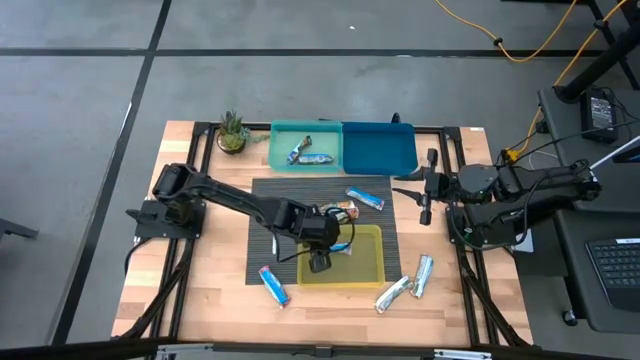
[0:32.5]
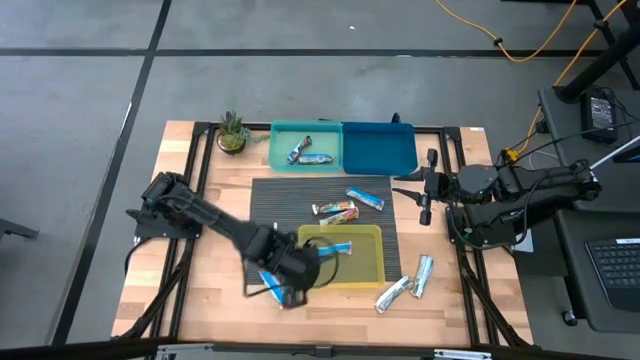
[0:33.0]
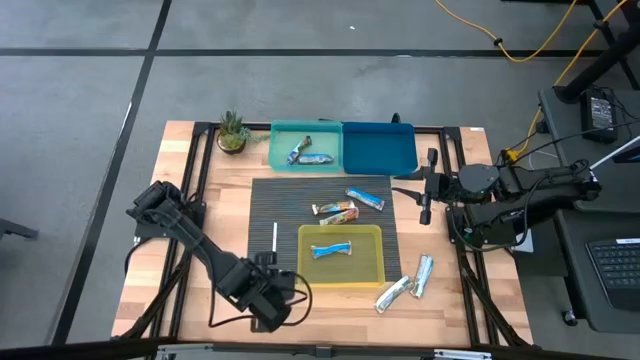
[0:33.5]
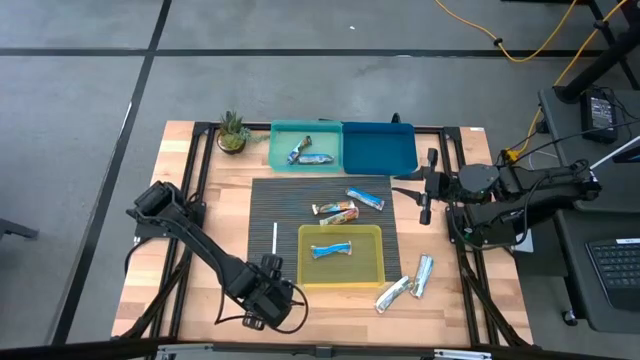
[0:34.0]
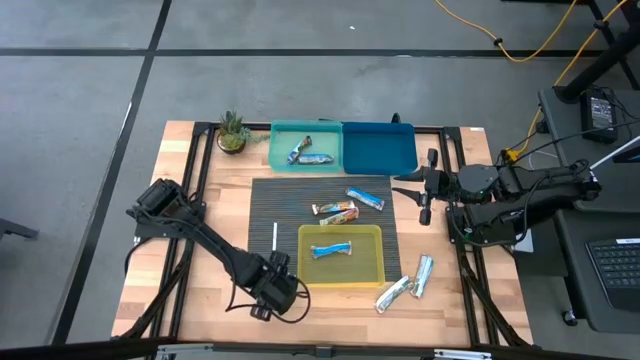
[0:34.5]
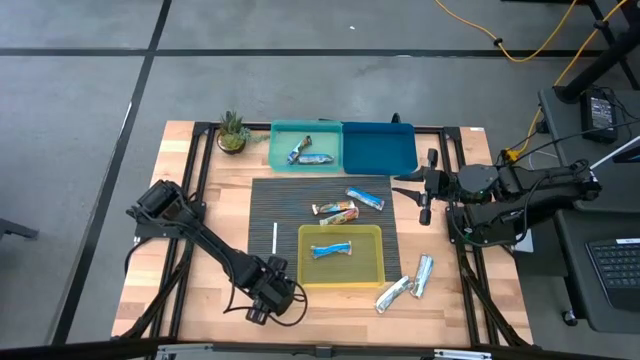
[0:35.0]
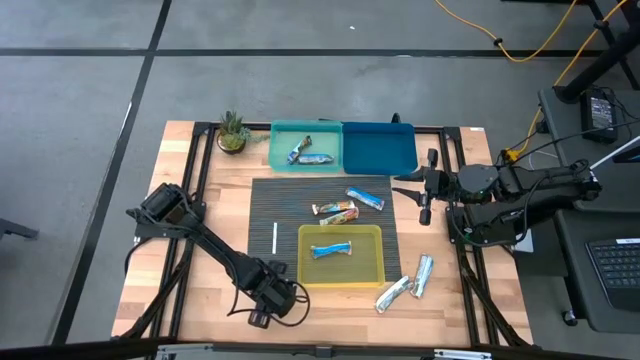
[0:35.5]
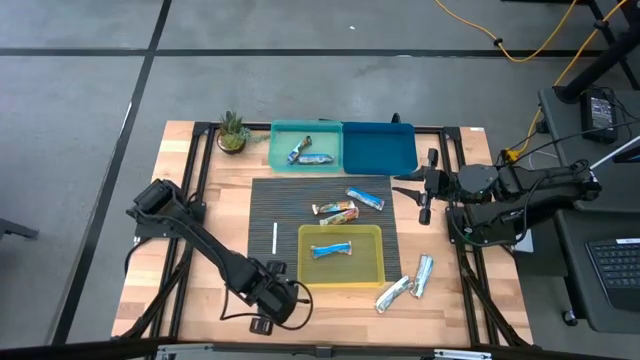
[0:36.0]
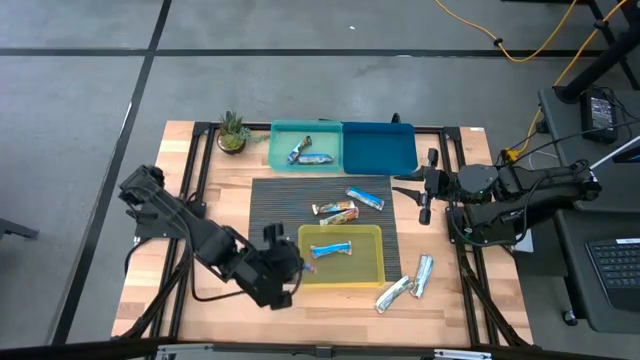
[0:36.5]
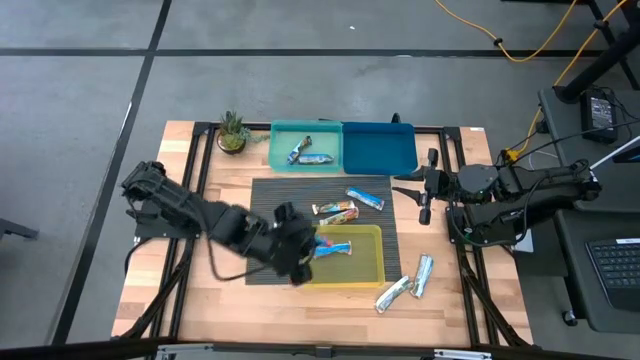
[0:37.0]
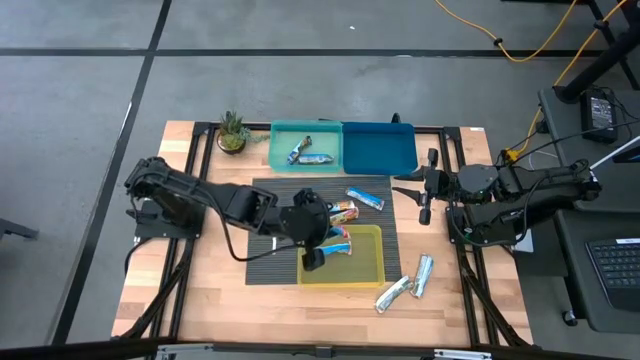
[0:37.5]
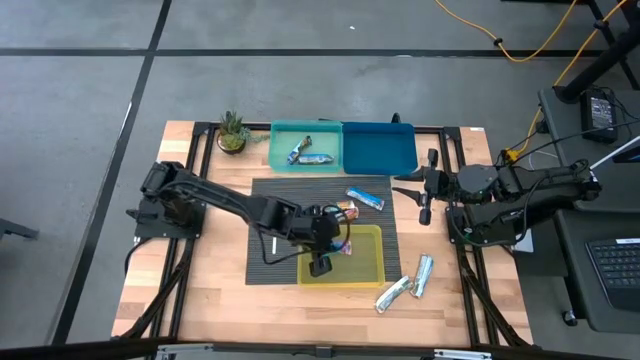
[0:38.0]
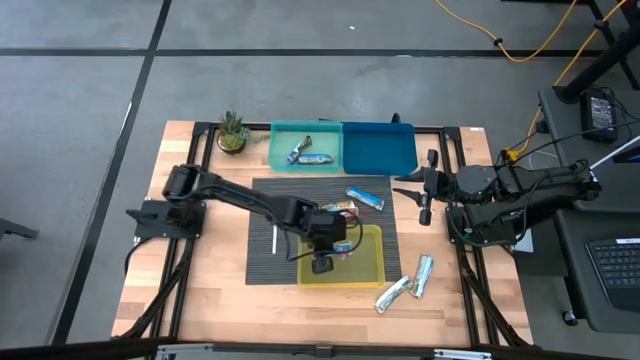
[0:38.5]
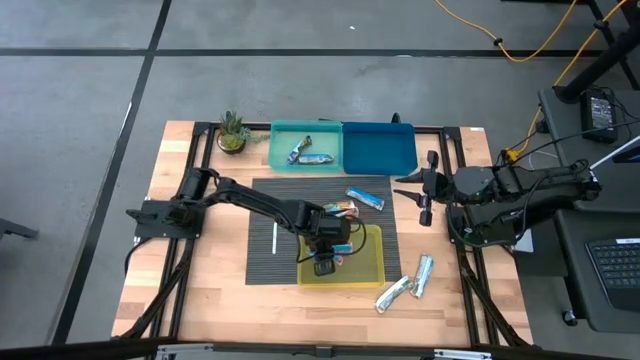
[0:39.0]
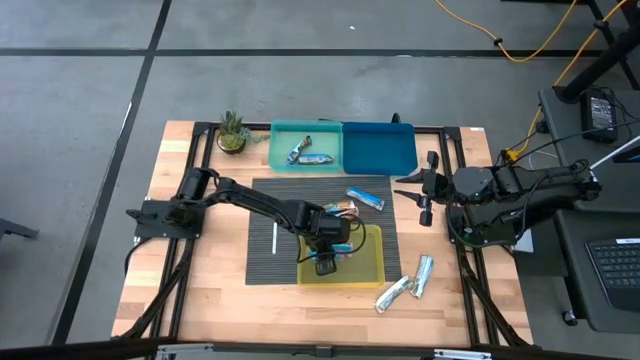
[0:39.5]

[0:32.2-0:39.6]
Task: Pick and place Granola Bars by type
Put the red granola bar into the yellow bin

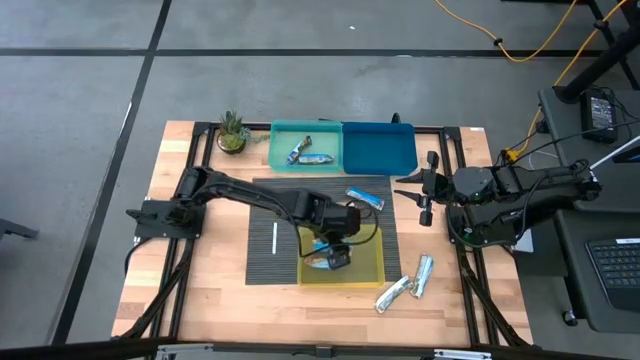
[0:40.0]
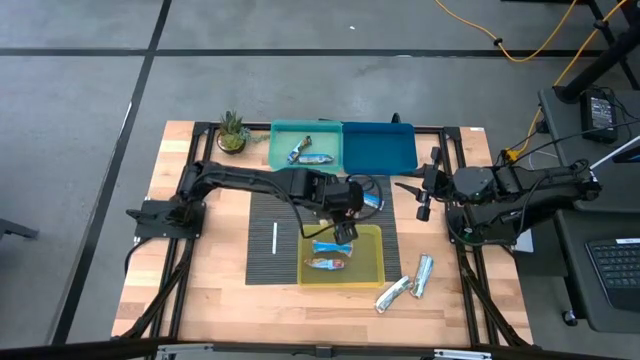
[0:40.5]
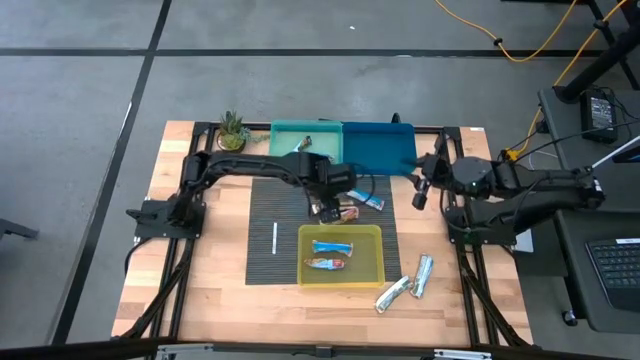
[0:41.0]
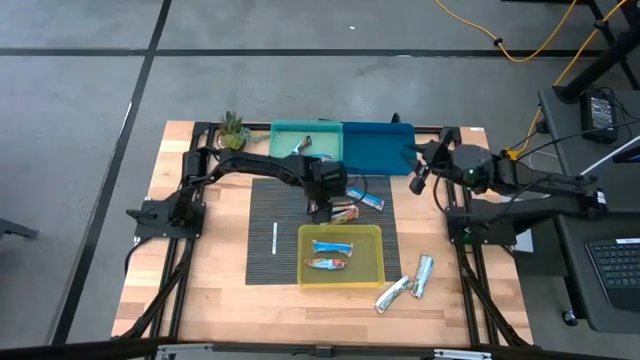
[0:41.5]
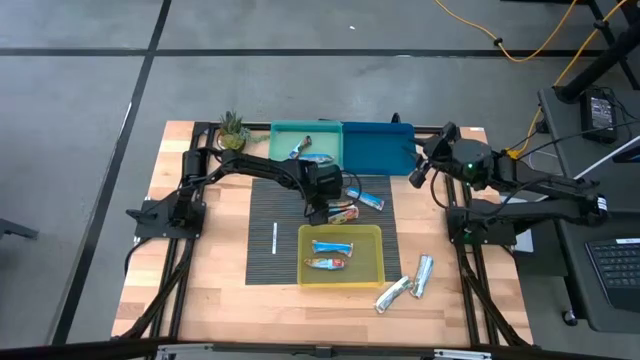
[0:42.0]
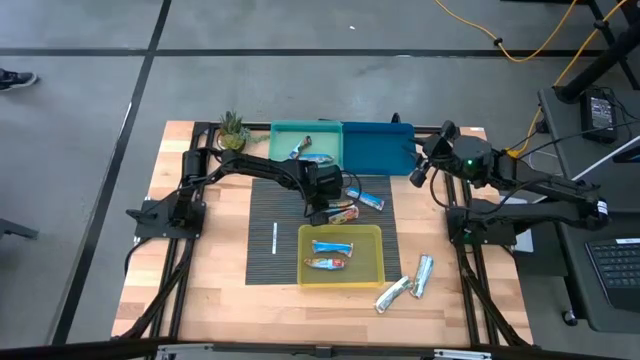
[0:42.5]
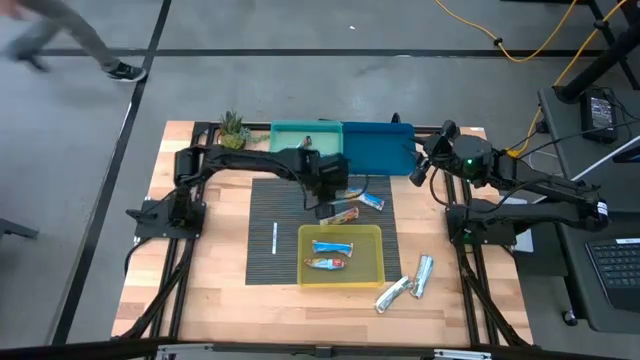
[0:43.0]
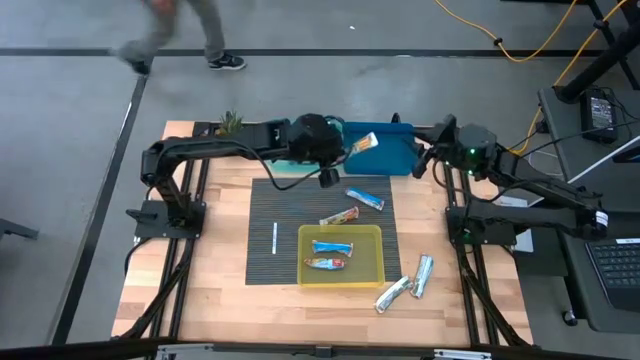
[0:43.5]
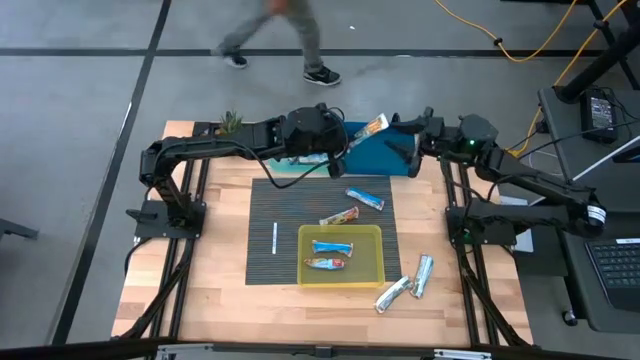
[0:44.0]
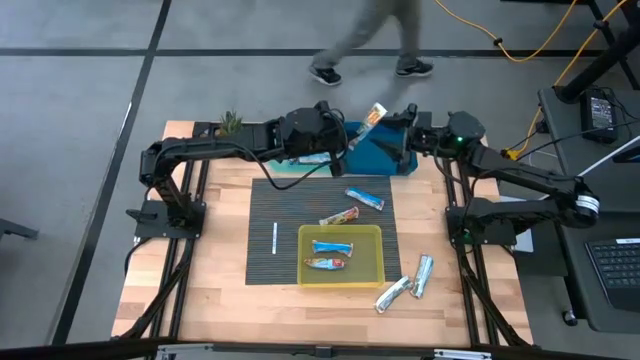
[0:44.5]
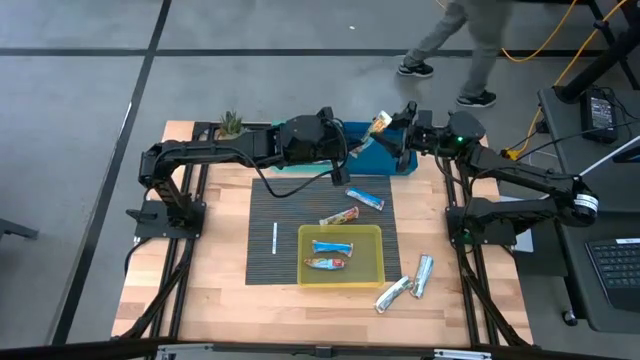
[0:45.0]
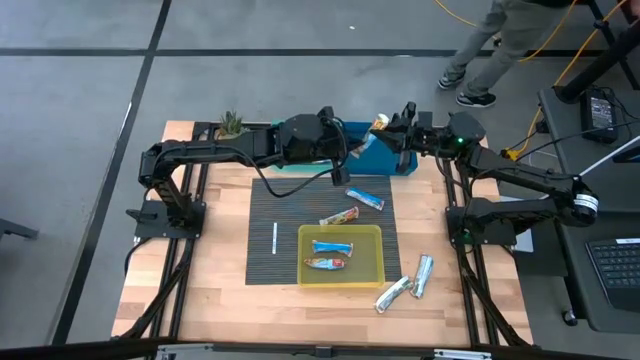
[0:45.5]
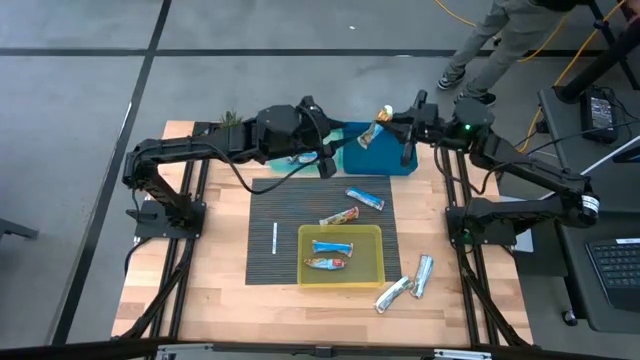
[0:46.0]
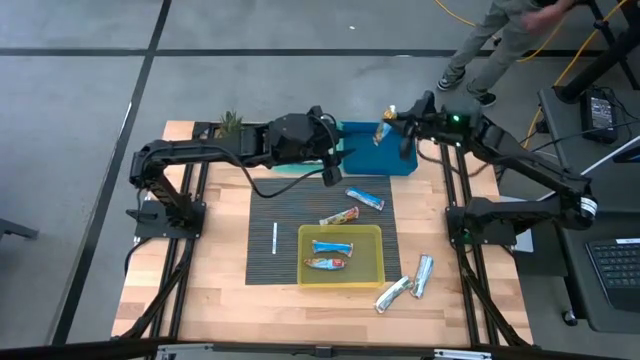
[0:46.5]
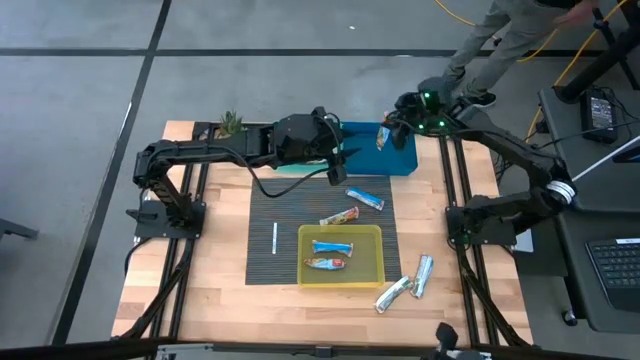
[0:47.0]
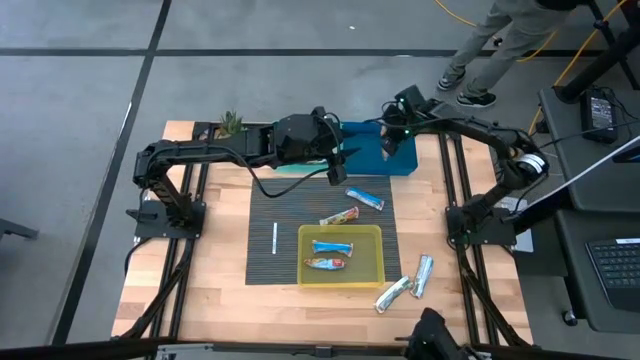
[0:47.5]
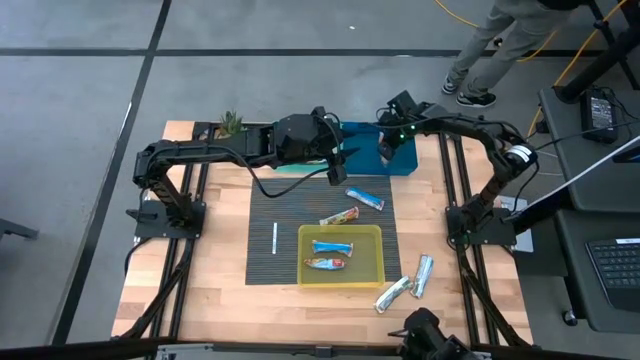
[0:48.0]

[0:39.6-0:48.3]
Put the yellow granola bar into the blue bin

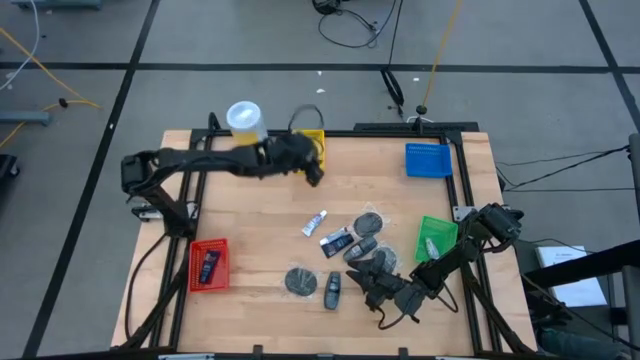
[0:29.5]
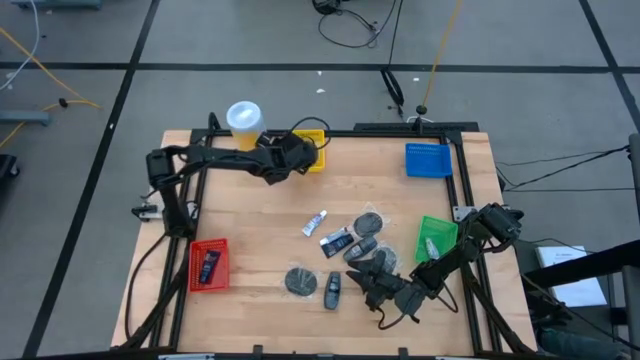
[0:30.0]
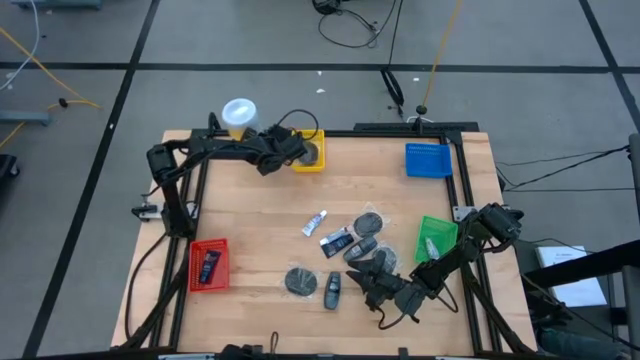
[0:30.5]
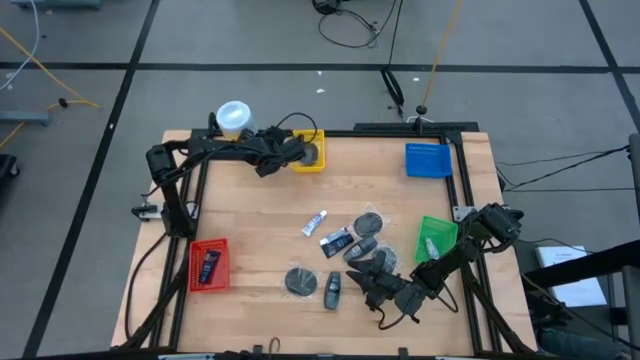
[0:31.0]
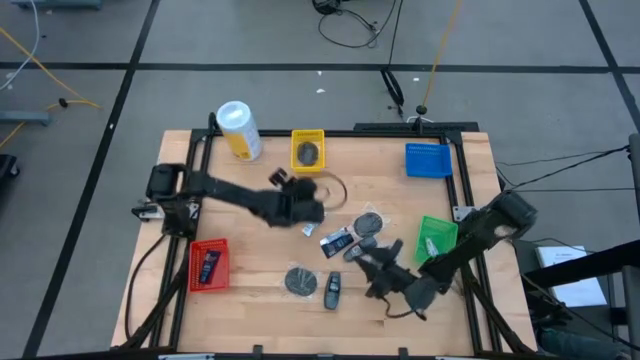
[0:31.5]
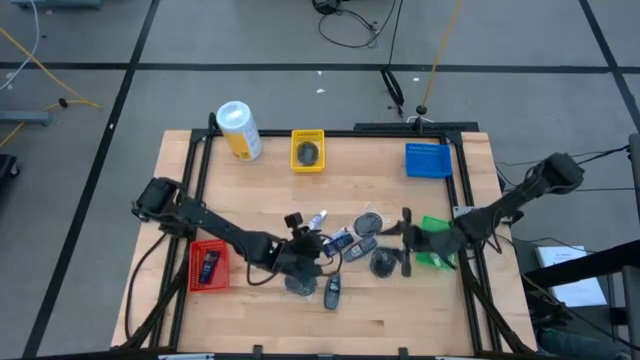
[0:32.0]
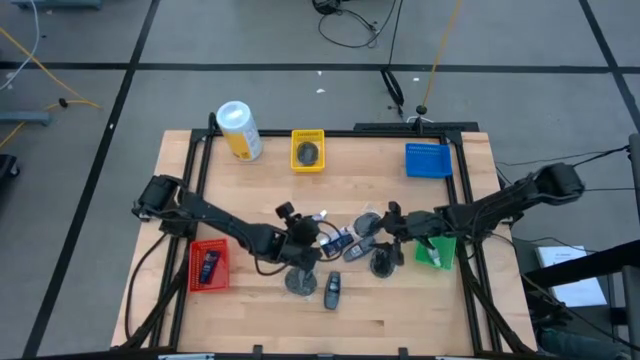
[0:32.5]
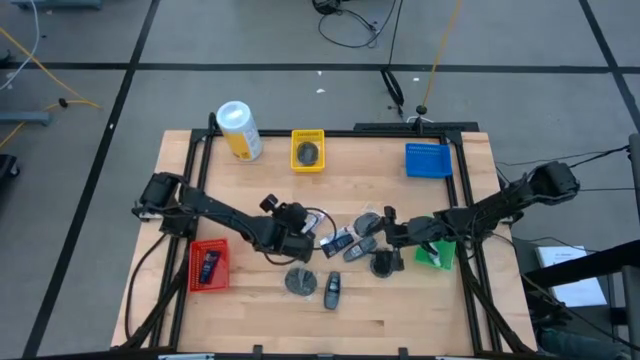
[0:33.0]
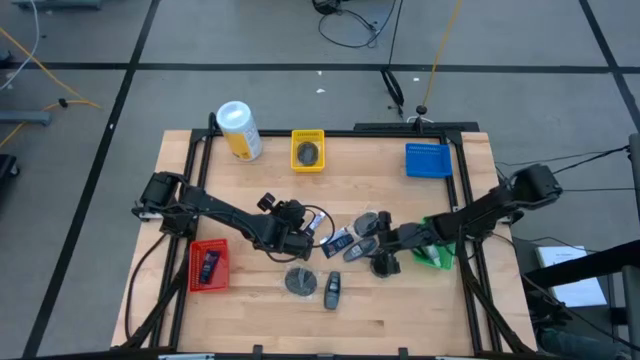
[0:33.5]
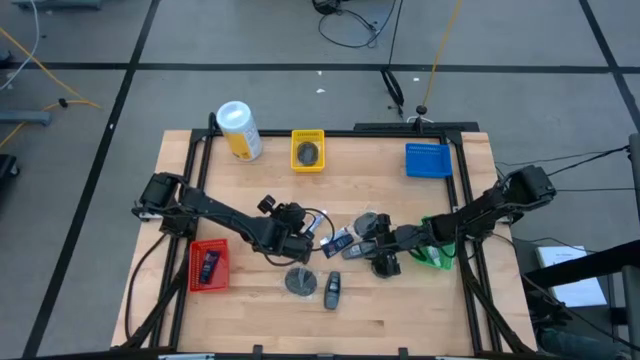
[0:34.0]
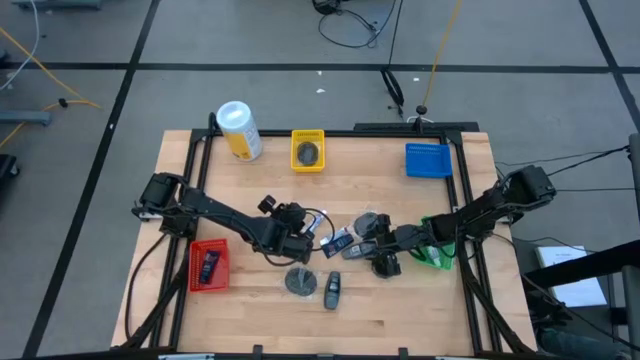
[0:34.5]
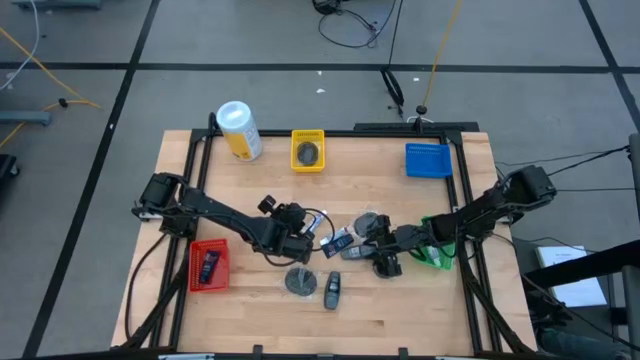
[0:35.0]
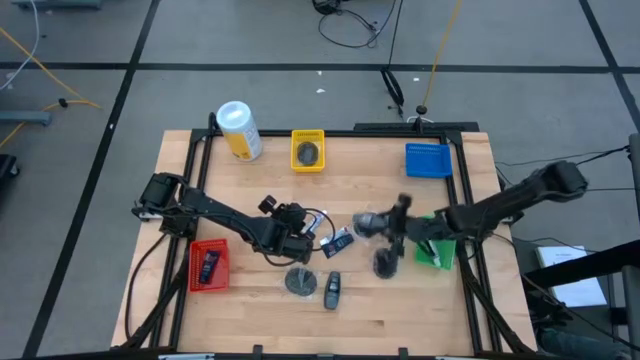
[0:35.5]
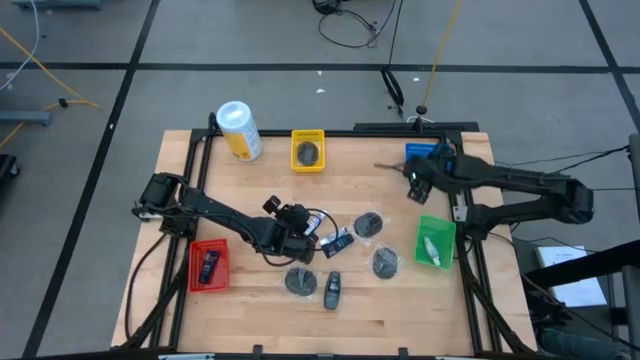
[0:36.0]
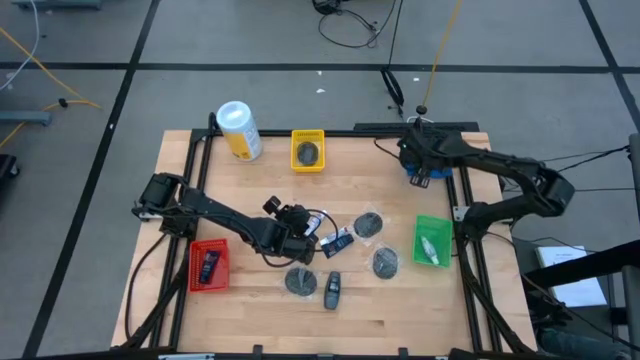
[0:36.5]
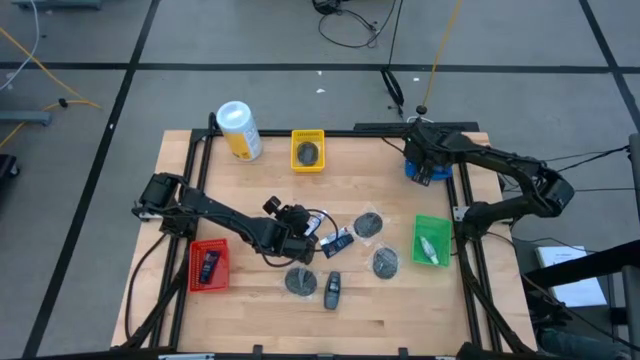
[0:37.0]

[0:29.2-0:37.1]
Task: Pick & Place Travel size toiletries
Put the deodorant into the blue bin
